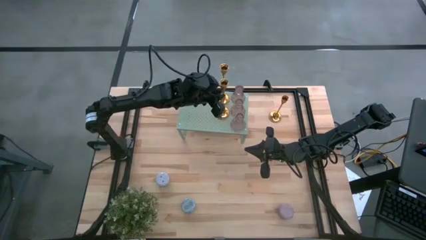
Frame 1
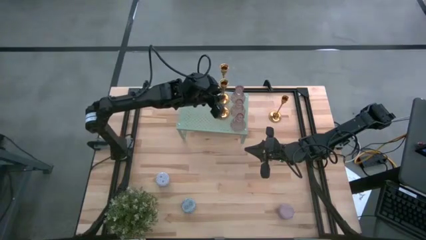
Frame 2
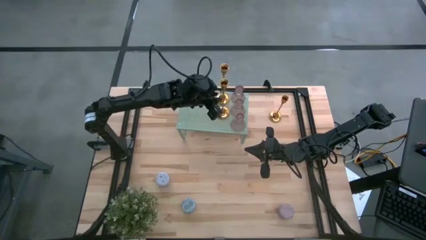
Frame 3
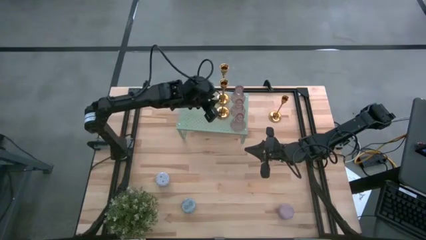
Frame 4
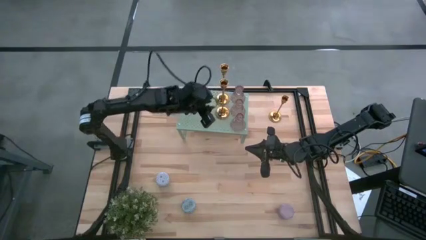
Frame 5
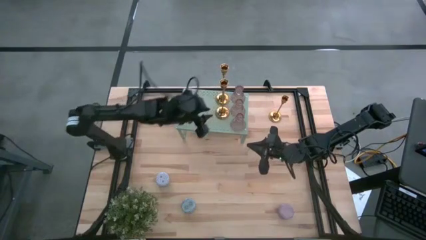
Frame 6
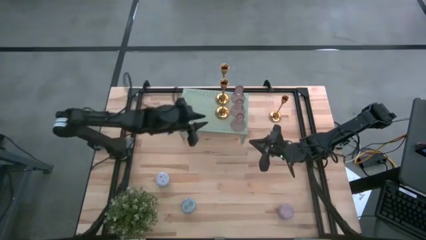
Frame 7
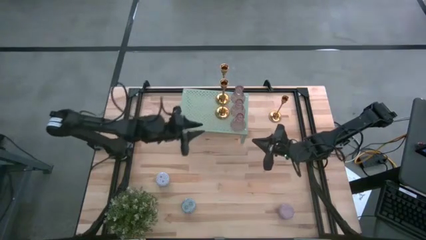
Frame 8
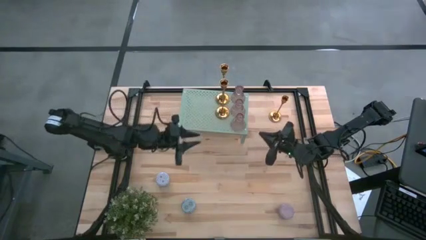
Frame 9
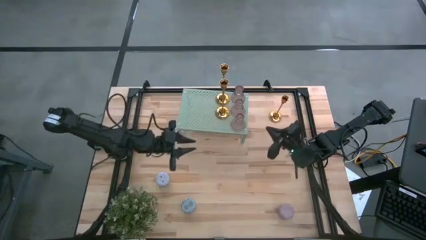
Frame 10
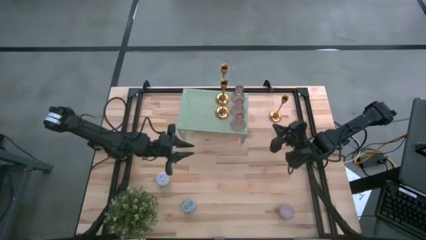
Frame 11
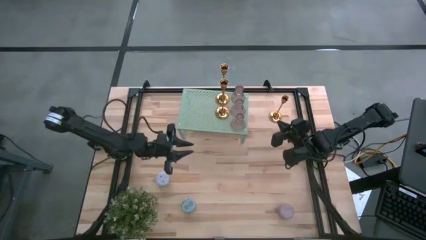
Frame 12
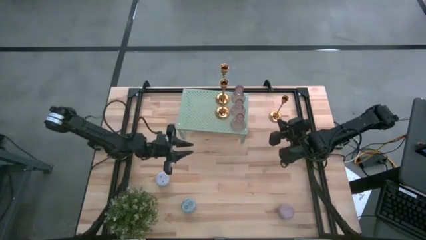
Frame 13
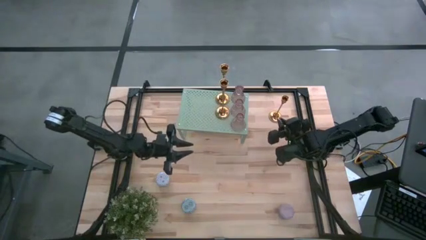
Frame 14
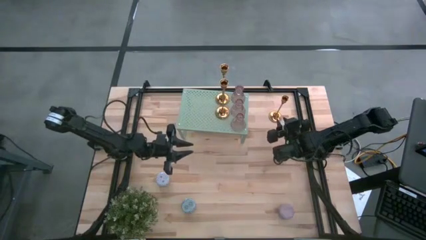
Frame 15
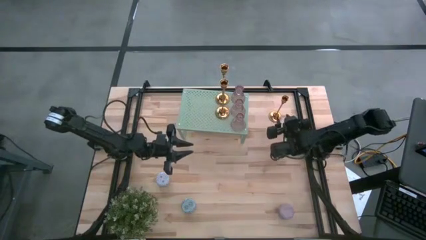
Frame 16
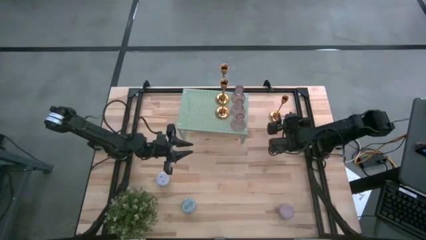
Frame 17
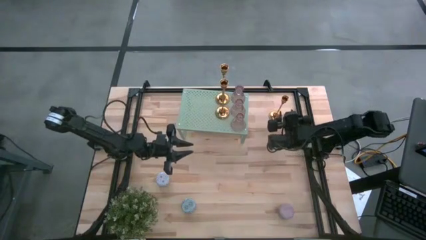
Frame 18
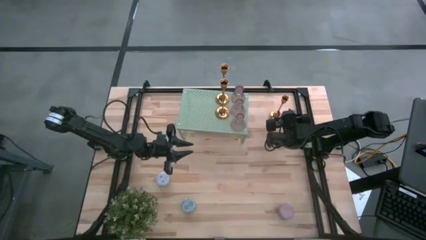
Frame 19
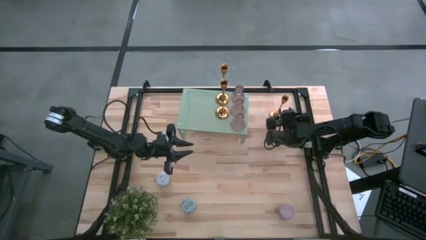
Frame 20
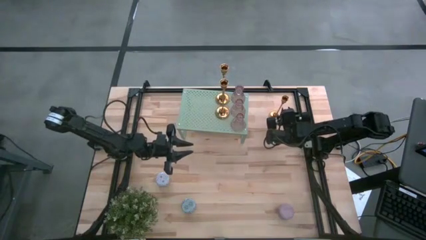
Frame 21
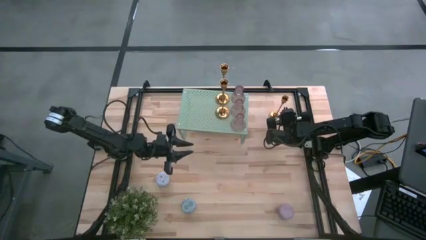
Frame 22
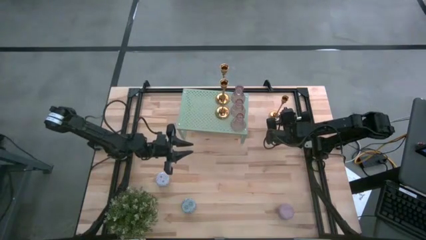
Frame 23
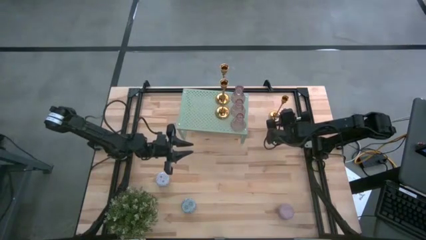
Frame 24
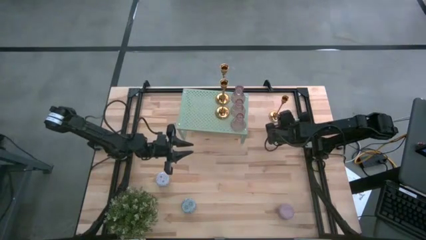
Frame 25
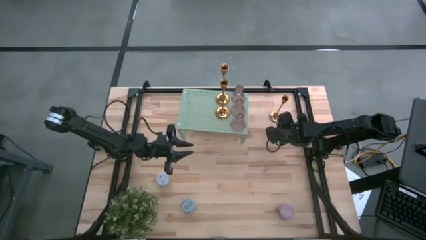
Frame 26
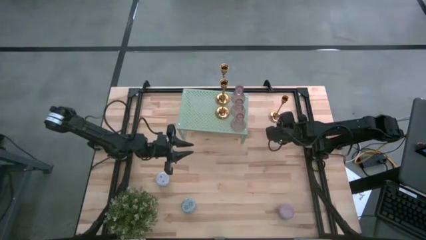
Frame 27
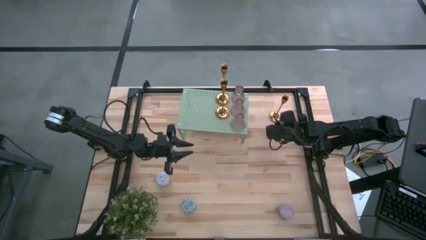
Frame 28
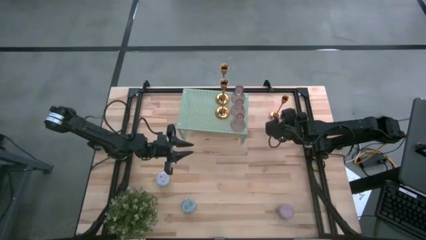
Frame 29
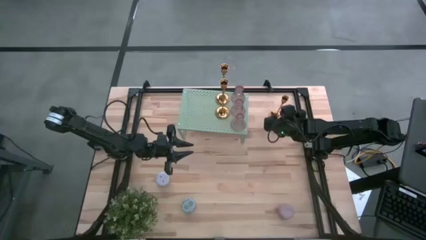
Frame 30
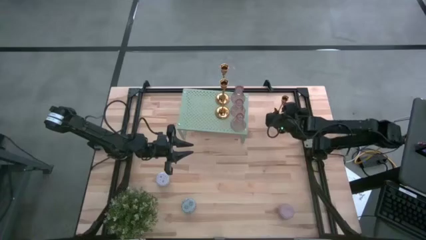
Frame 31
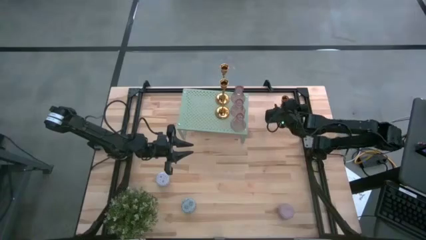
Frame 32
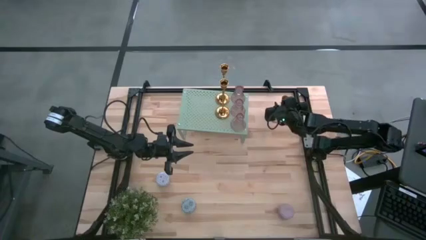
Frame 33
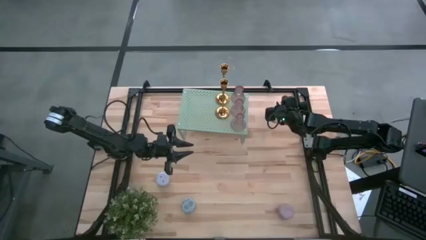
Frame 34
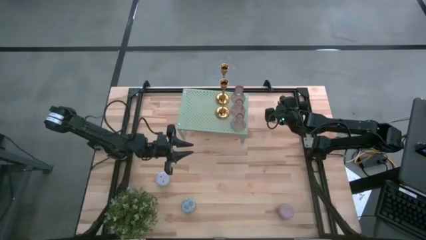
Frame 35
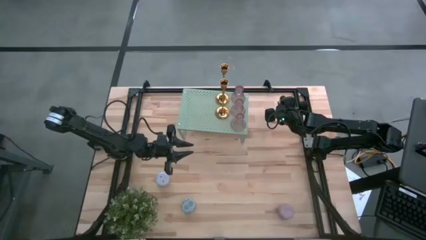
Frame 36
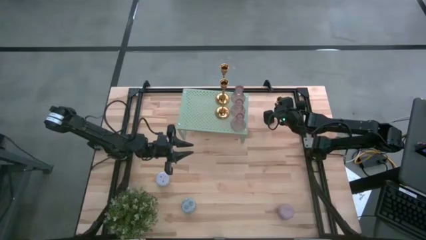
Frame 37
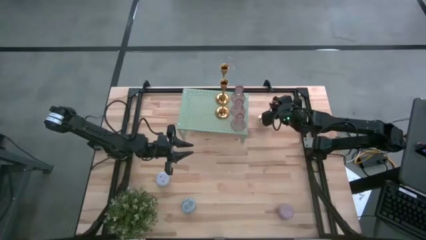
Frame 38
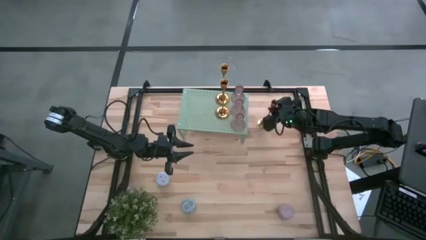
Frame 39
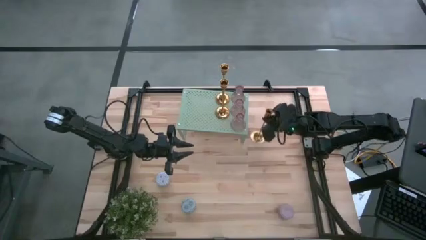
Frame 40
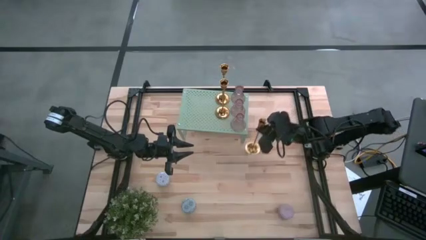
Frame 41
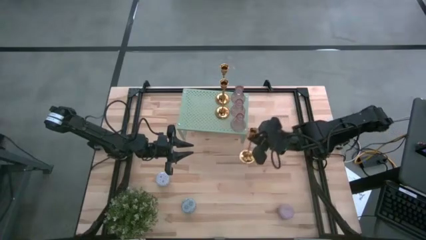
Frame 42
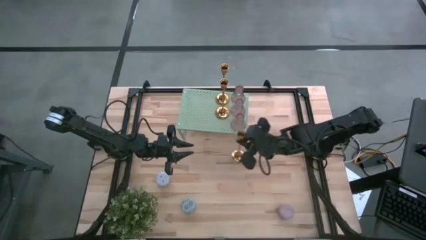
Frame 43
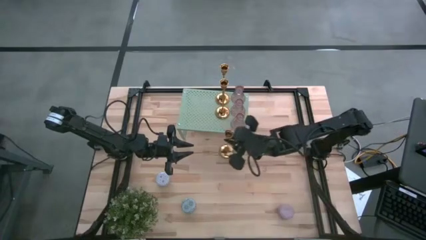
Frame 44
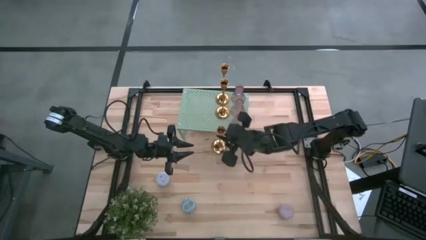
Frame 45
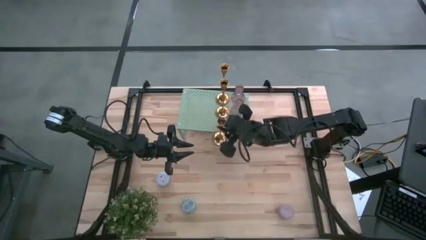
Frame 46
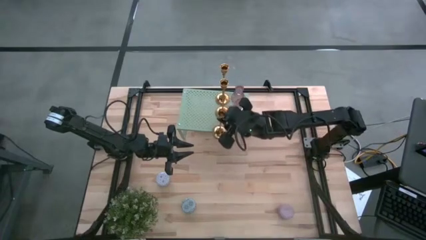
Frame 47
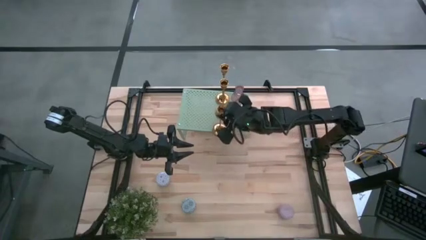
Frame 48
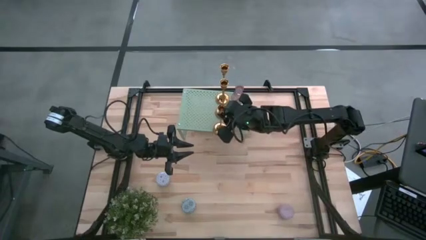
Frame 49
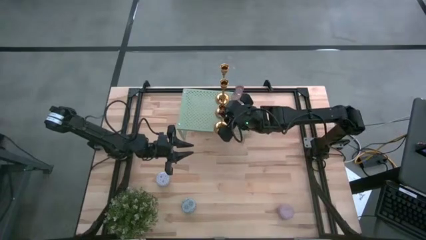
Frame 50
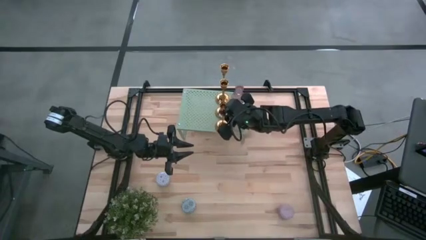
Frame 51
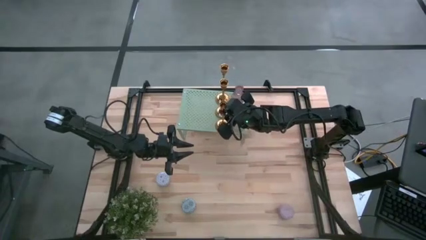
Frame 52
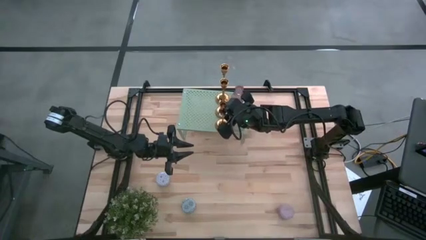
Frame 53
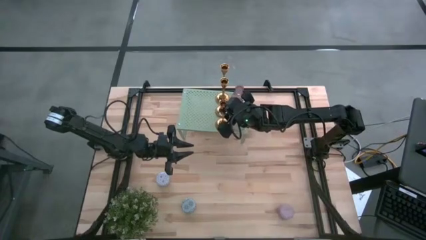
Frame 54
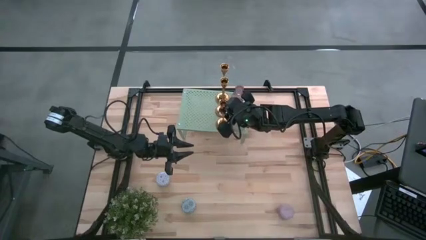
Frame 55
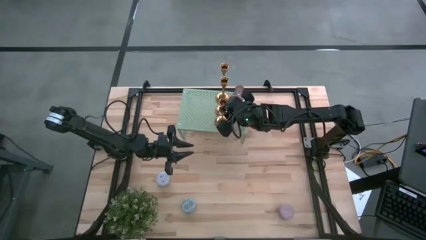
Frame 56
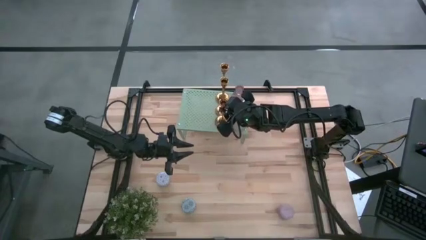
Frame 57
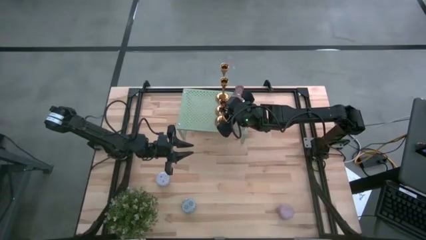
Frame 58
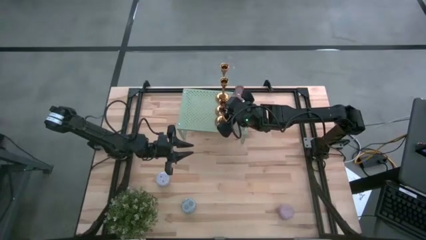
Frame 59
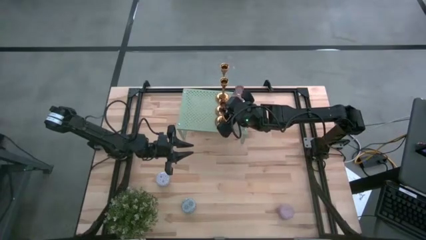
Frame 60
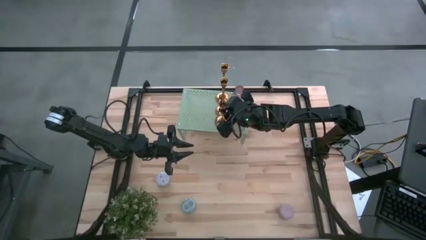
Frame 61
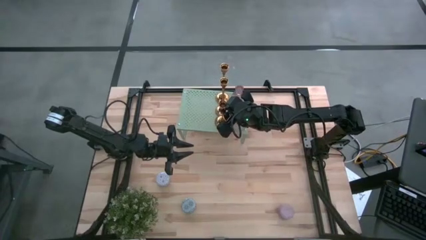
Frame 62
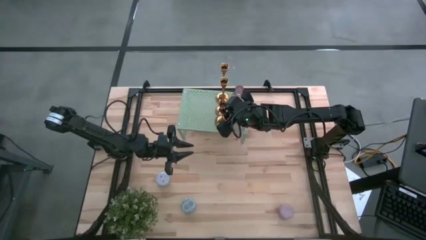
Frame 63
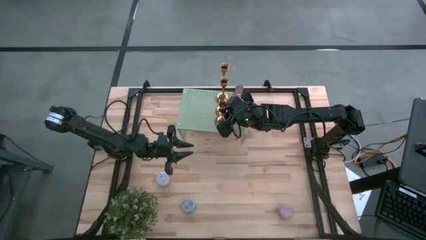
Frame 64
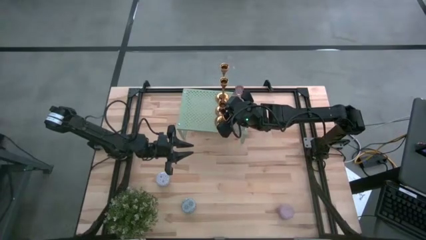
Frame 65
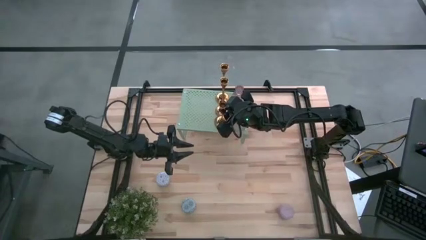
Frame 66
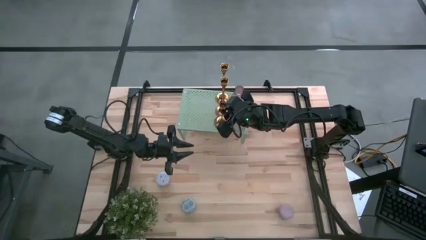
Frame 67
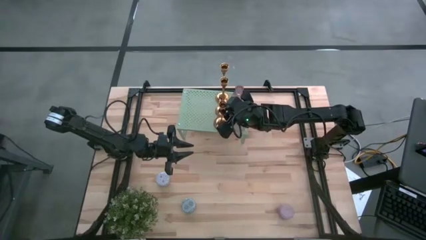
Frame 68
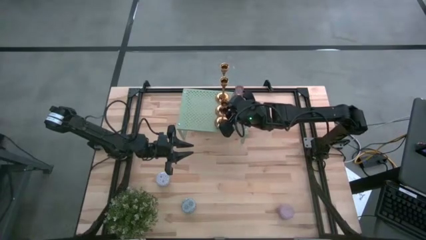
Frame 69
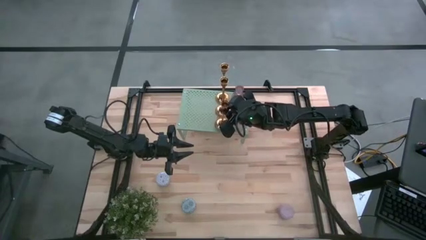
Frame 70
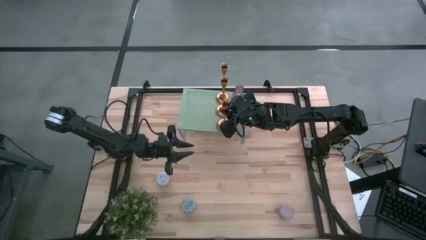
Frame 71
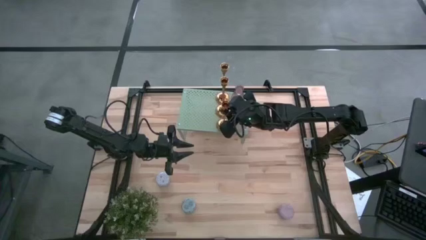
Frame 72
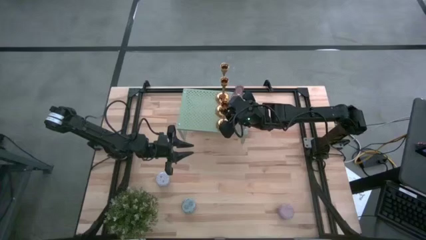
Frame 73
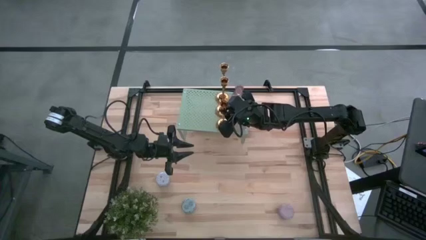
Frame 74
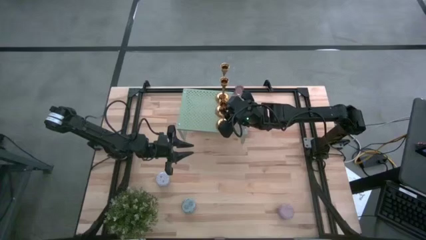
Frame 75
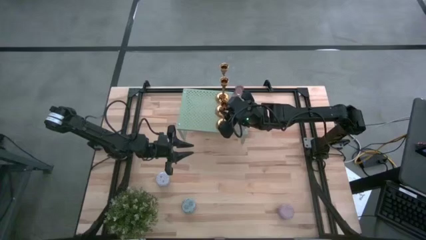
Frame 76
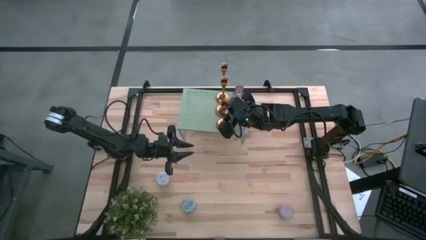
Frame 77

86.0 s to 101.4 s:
Task: Pick & Place candle stick holders
Put the gold candle holder on the shelf aligned with the other gold candle holders
